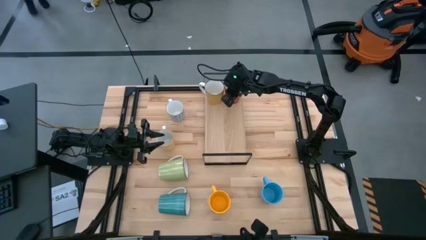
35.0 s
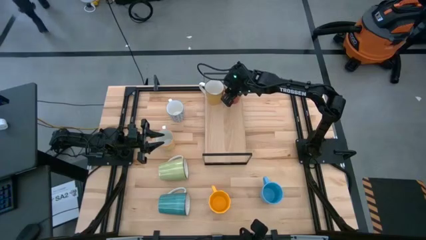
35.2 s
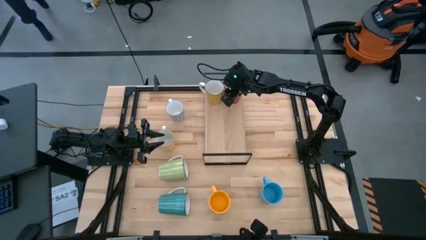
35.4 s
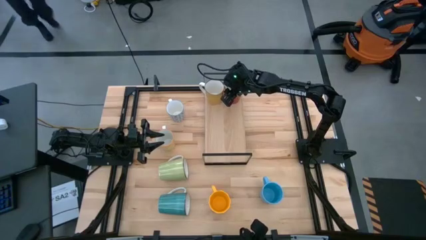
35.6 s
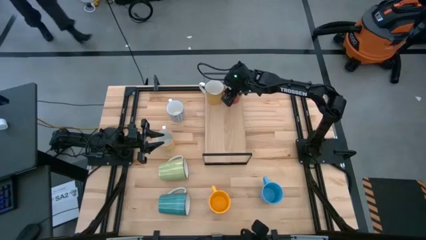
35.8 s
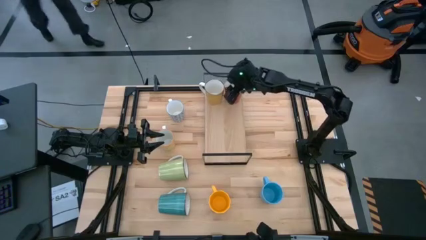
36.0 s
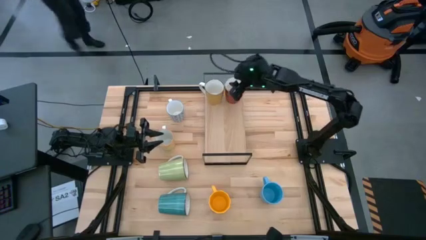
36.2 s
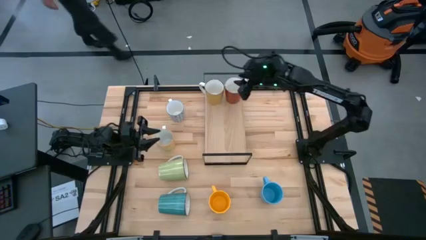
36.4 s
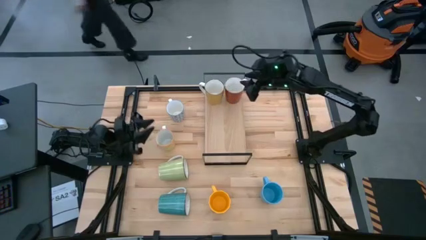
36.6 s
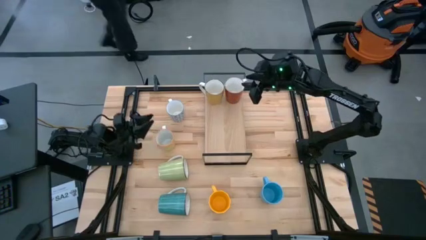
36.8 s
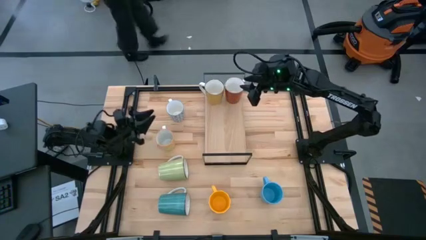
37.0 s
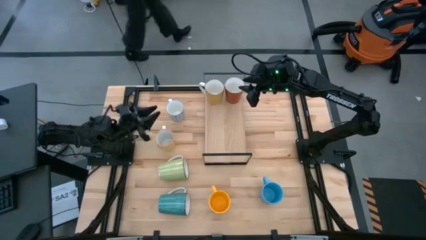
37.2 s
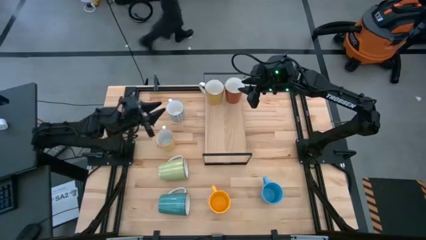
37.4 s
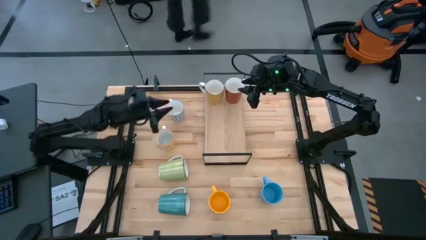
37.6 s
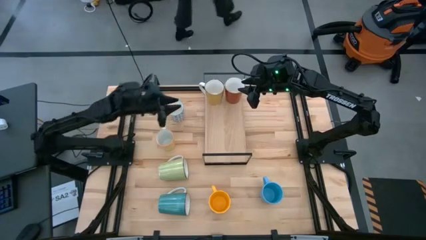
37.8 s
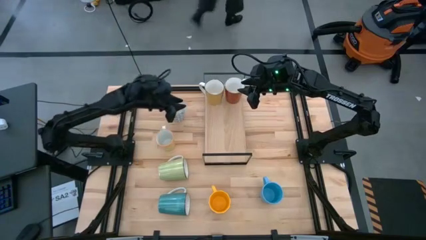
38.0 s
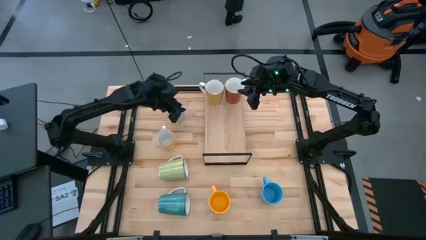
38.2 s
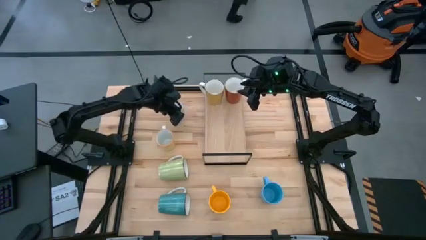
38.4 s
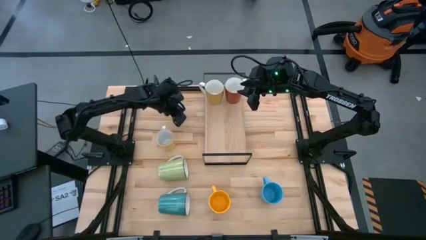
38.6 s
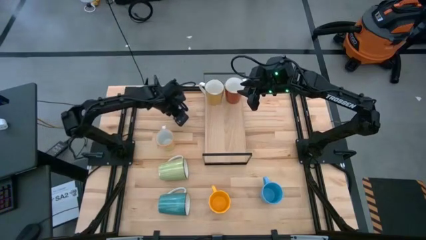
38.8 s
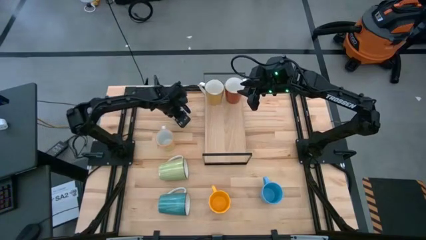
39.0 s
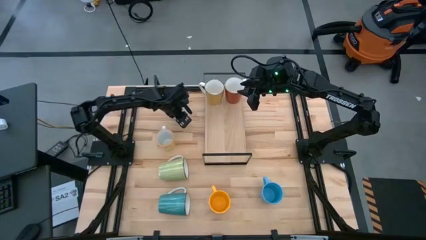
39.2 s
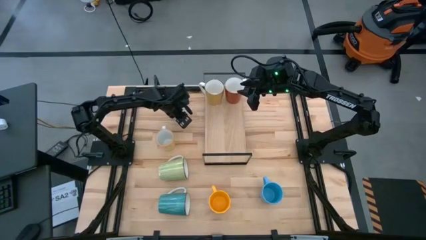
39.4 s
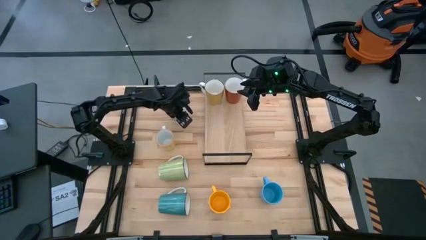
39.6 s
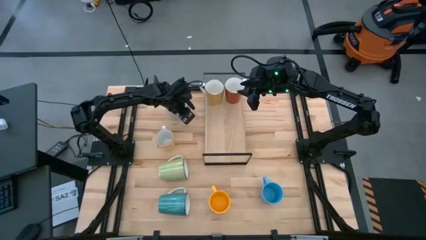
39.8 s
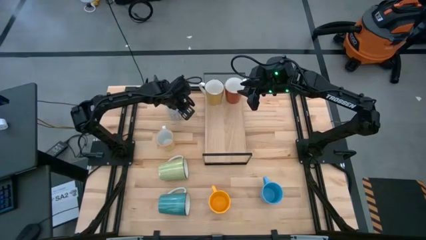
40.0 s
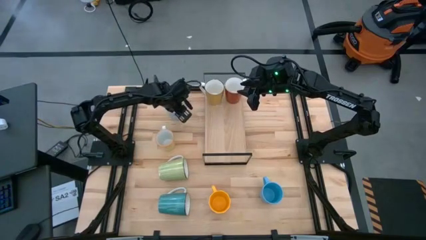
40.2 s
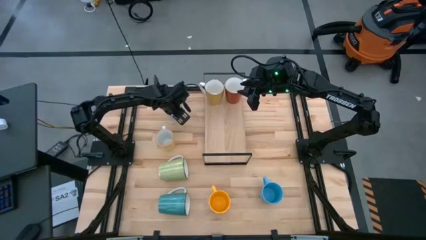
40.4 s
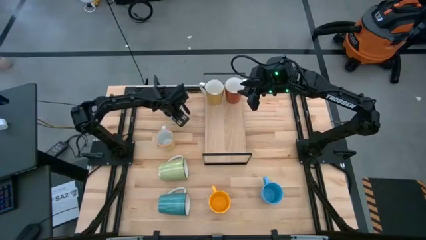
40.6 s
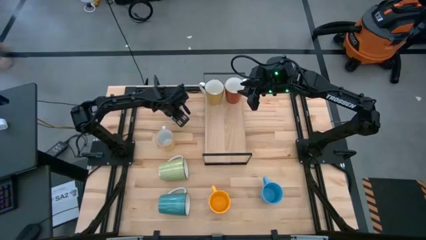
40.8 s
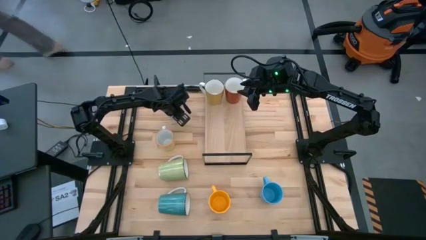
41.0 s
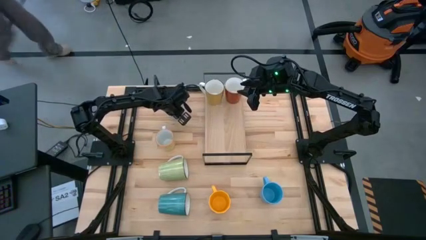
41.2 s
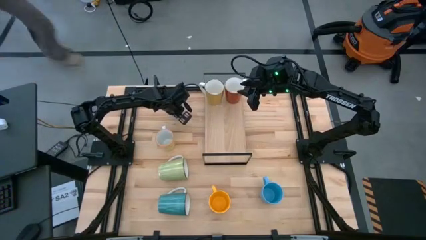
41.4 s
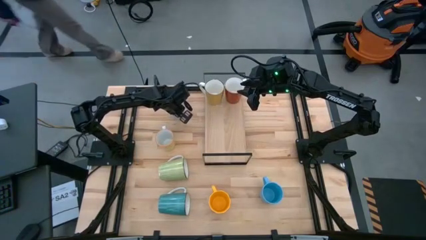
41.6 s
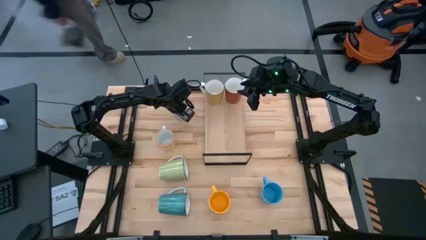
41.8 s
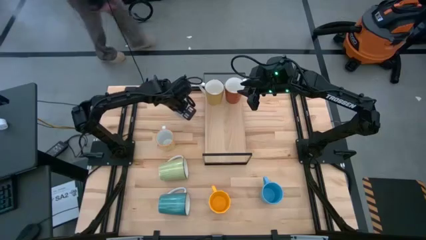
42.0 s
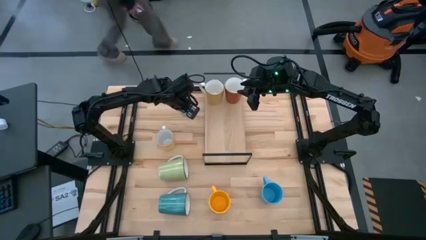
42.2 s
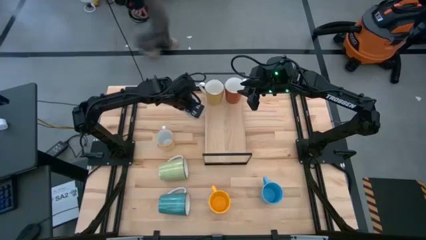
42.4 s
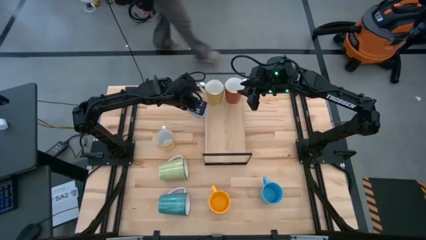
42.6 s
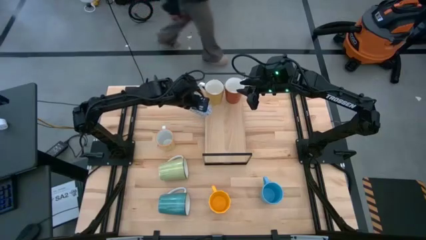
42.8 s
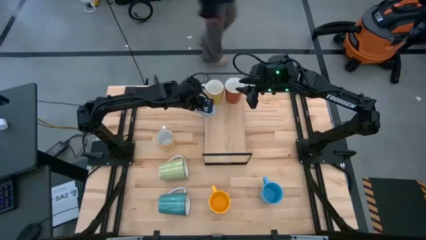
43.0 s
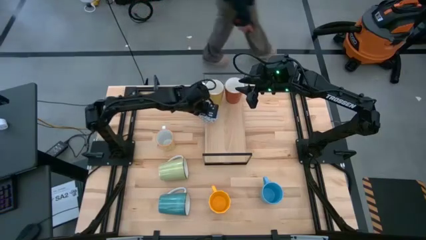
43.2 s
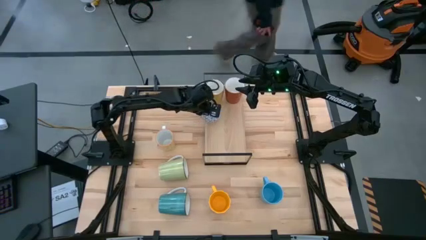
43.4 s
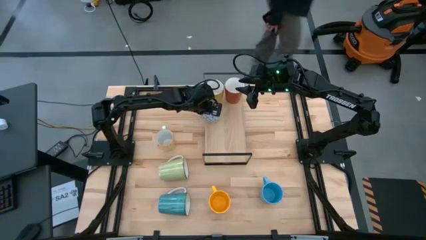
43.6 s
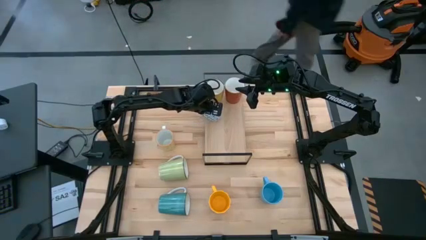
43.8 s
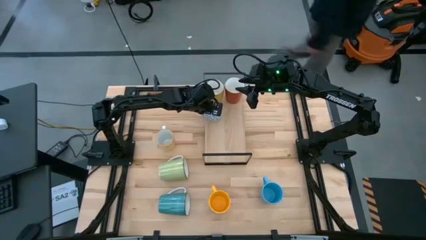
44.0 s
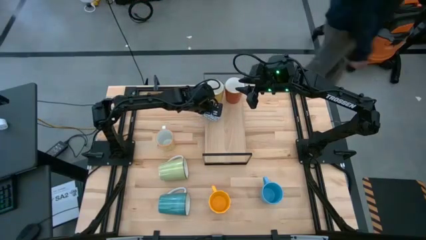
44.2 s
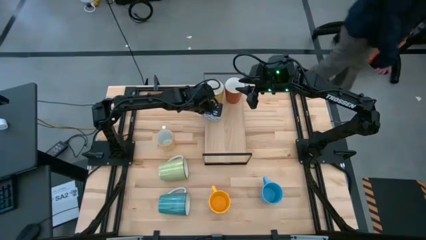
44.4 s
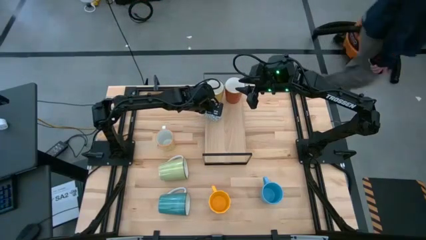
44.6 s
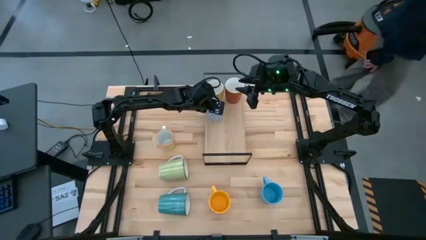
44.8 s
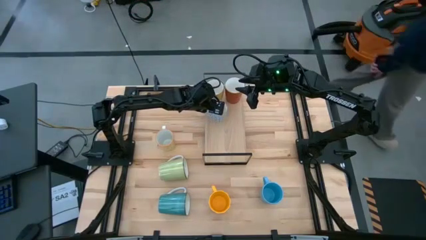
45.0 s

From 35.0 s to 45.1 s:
Task: Place coffee mugs
Put the blue patterned mug on the shelf
